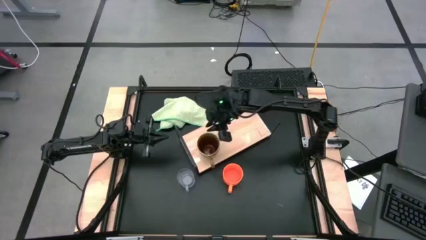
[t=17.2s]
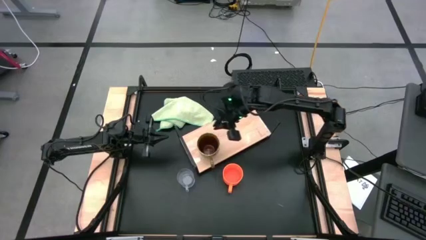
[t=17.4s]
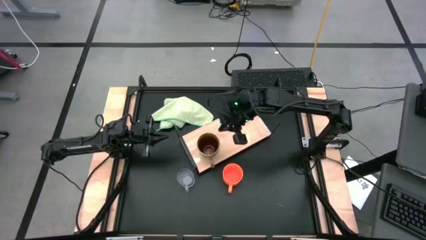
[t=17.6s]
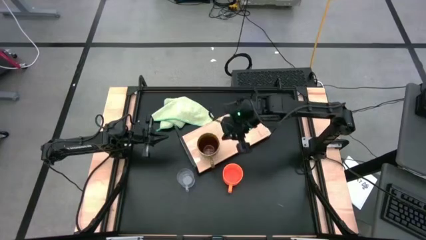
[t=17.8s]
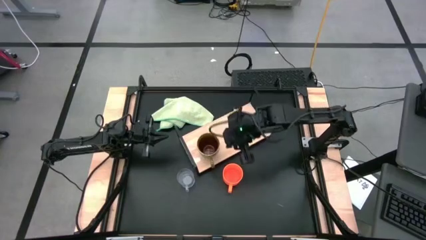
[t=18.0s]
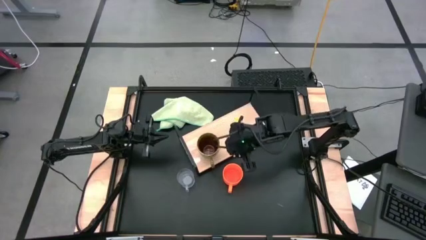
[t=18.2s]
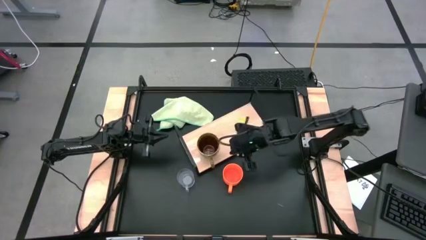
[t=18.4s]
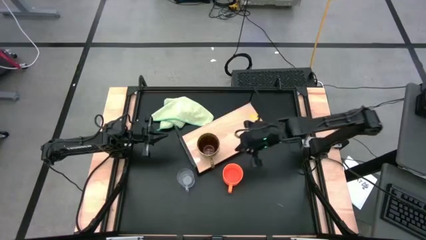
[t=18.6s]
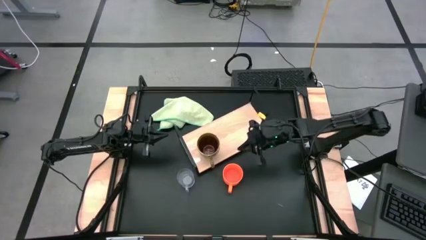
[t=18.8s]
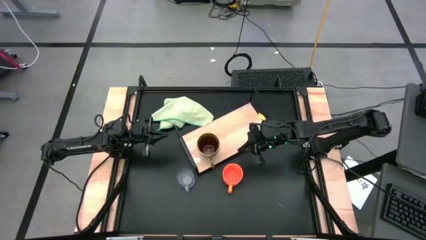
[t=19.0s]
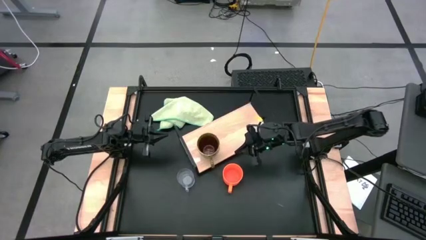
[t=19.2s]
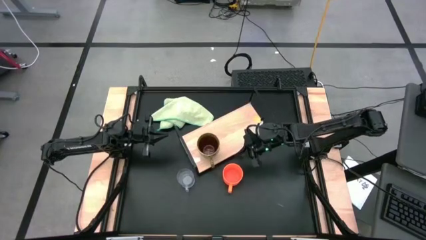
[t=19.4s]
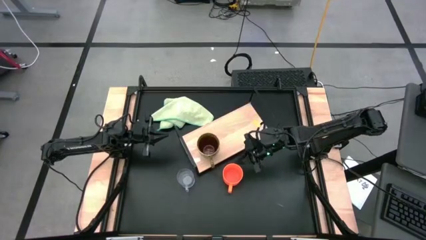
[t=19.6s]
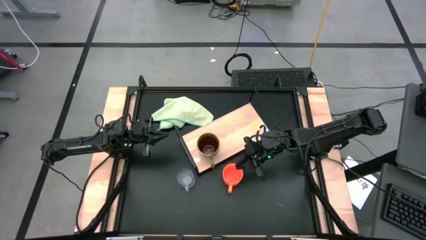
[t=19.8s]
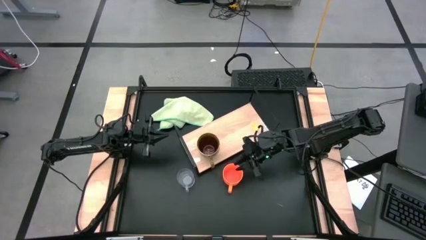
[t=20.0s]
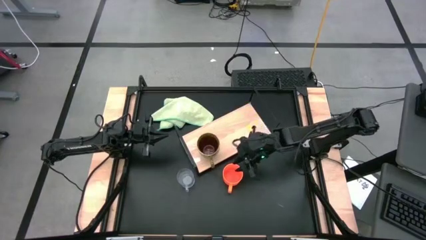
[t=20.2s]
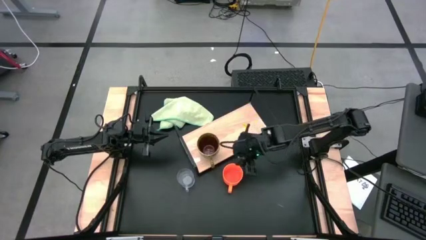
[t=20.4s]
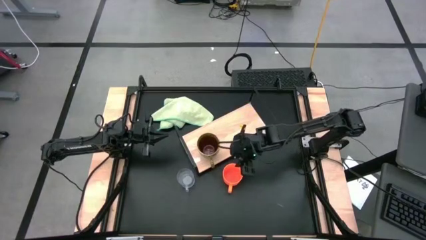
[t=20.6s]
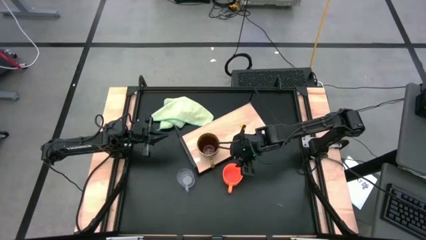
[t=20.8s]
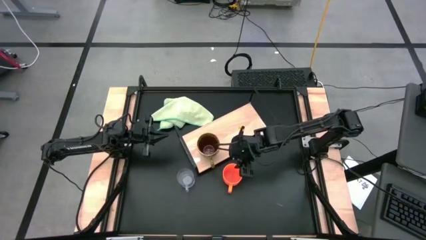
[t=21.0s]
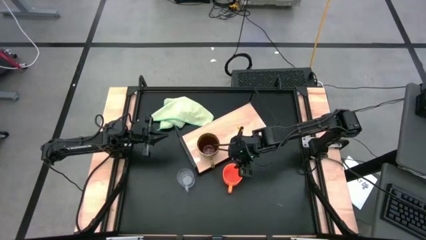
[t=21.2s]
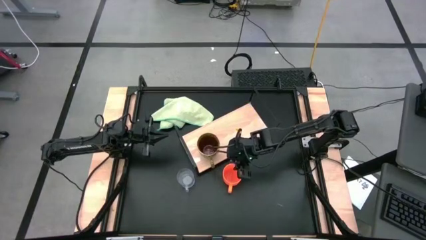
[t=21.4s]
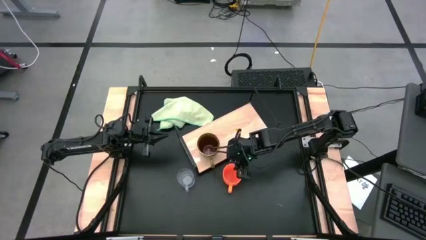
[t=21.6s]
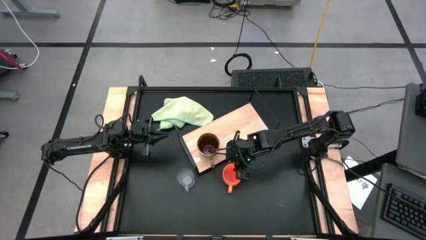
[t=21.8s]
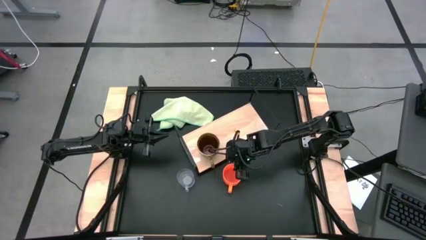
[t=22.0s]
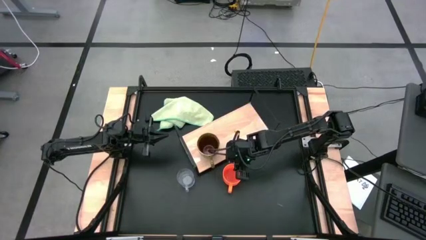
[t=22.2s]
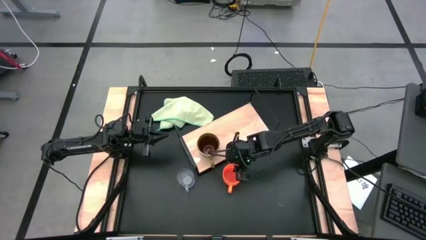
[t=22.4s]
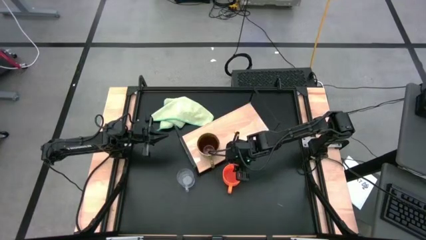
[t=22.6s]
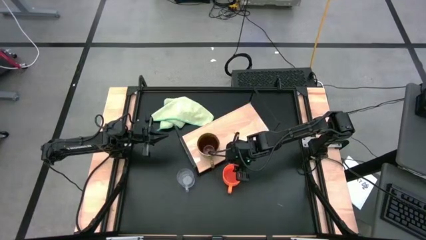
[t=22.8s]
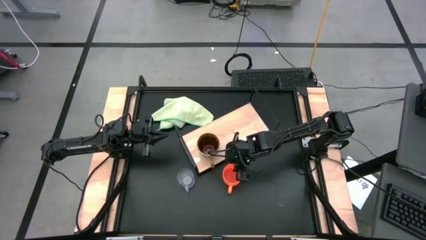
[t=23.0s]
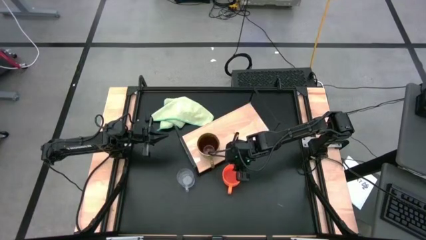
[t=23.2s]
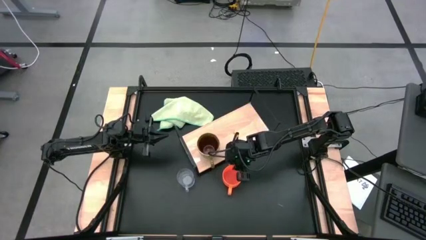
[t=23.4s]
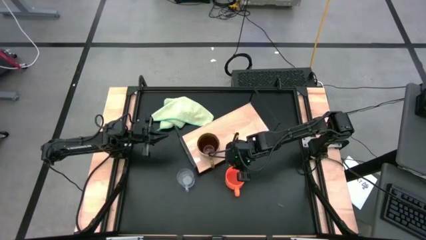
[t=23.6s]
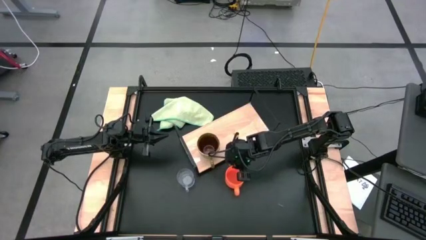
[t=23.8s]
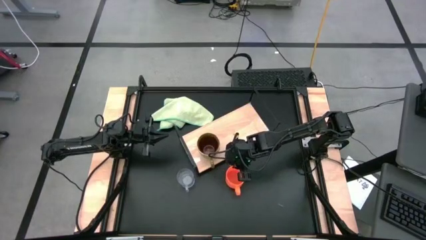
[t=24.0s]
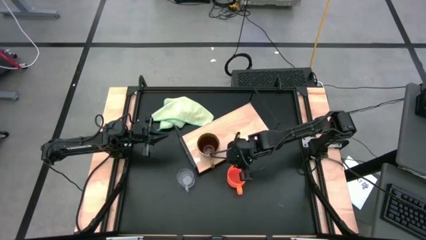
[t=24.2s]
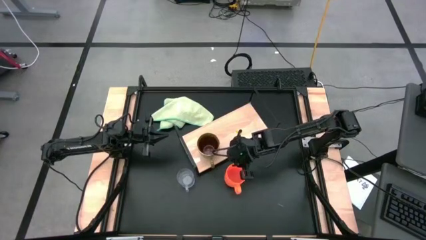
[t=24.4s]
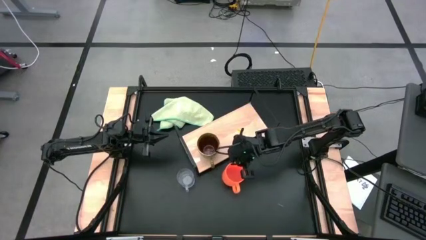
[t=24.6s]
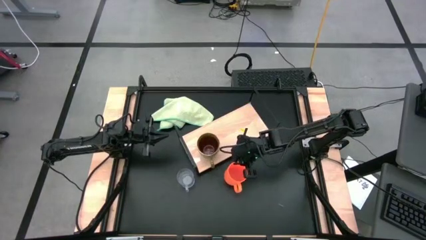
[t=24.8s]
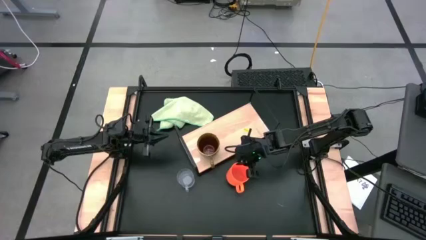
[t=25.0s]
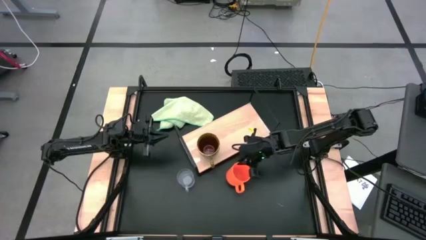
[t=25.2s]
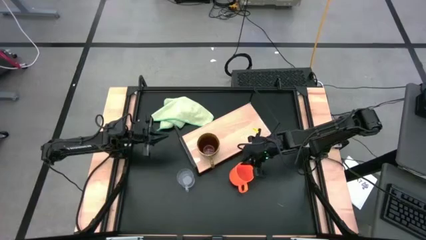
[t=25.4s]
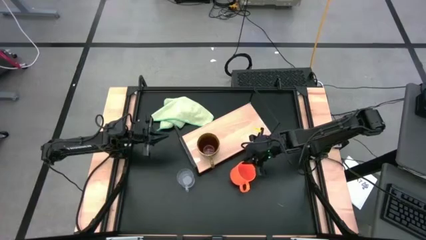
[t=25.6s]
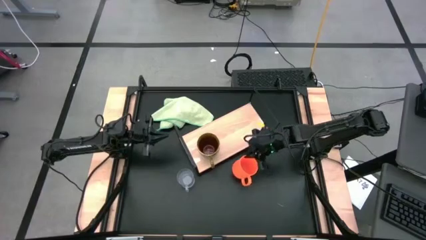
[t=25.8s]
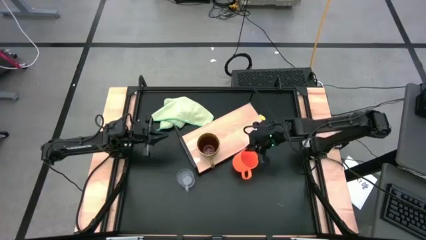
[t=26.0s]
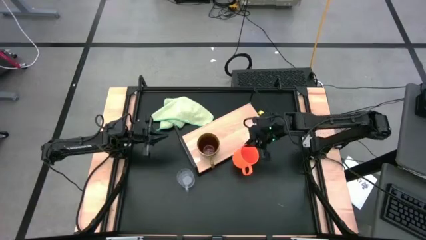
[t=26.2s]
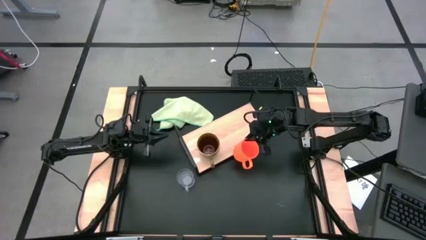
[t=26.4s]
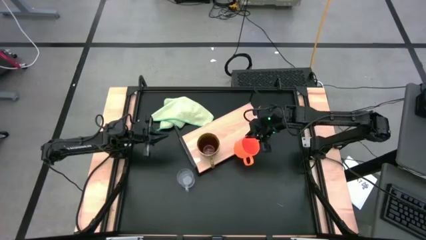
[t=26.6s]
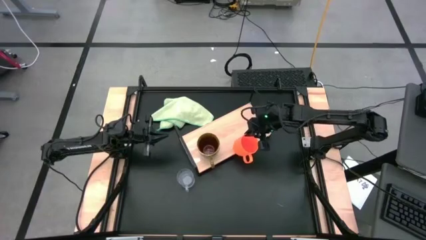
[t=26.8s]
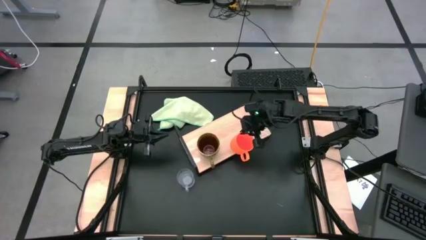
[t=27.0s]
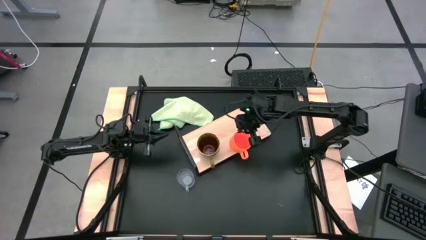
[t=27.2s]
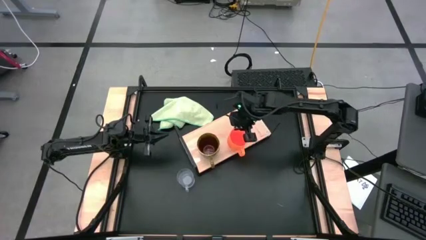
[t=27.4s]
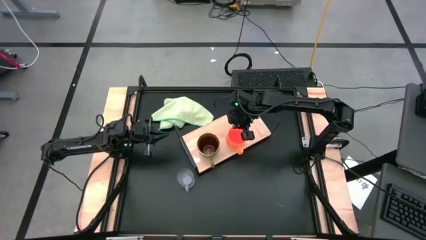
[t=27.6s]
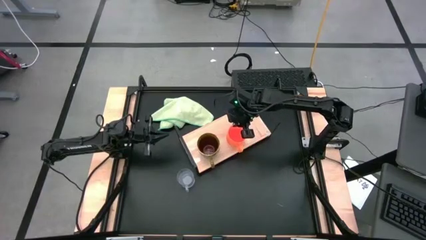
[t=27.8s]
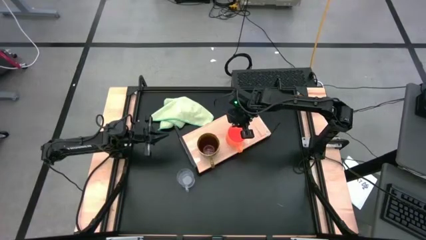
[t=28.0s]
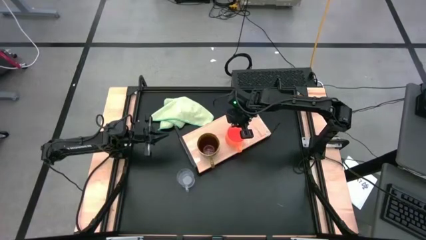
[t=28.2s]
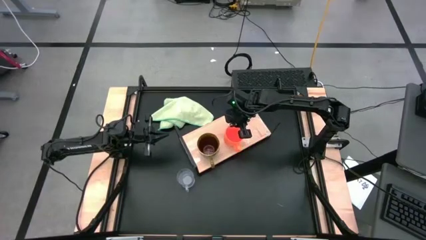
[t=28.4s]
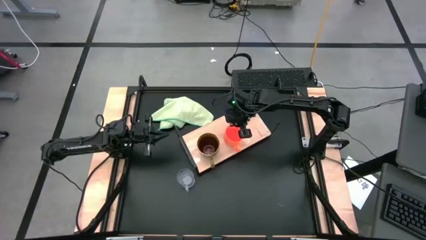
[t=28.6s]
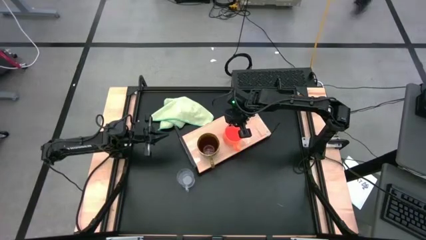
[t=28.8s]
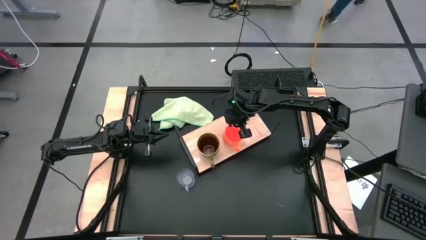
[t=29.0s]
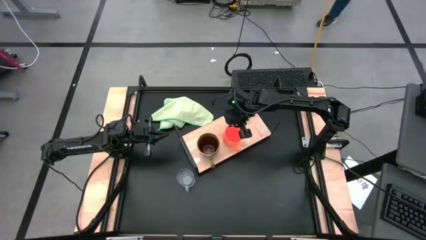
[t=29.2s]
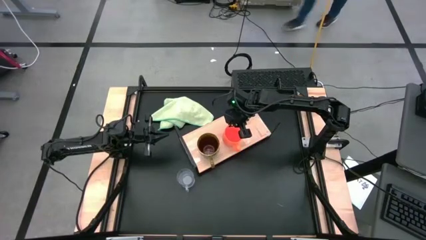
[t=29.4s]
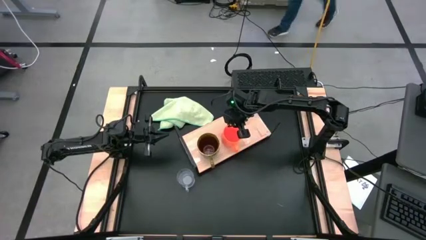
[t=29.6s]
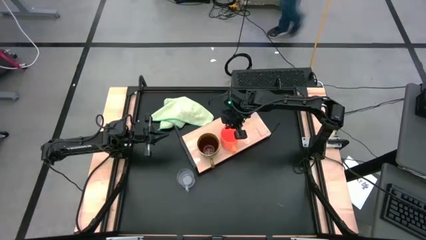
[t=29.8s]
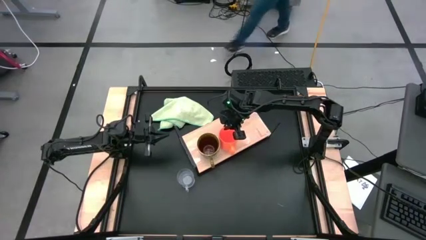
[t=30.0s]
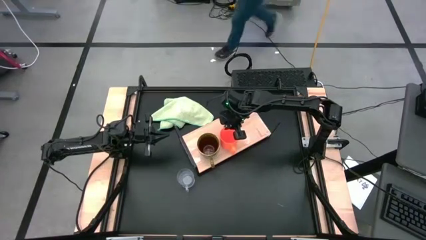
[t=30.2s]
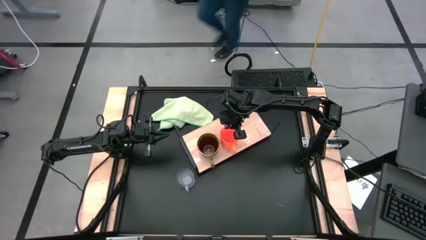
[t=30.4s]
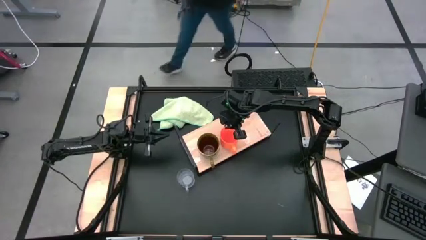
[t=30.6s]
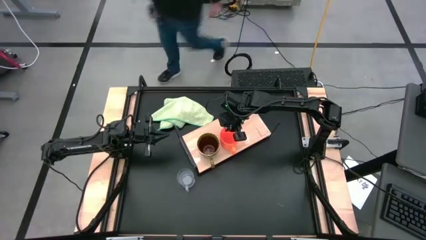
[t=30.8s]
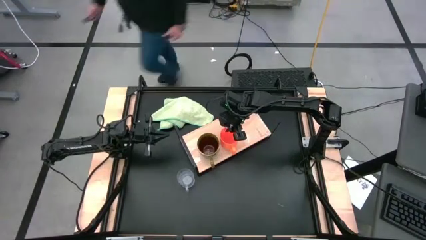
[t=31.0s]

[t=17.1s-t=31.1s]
Task: Stack small to large cups/mugs on shelf
Put the orange mug on the shelf
